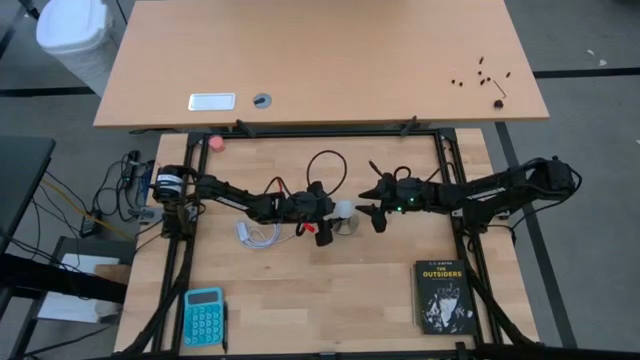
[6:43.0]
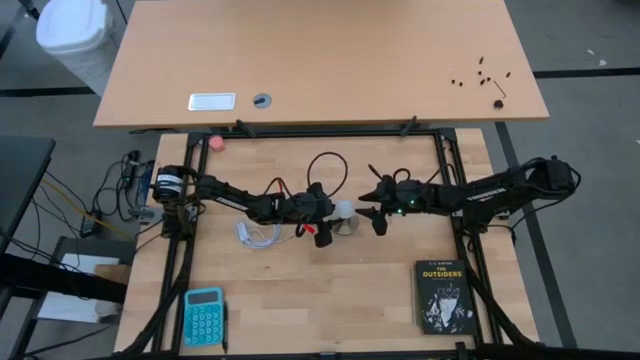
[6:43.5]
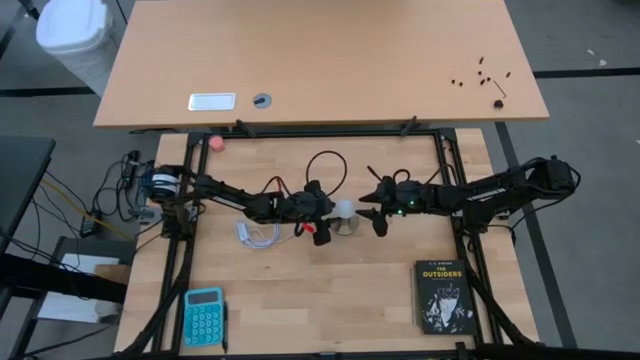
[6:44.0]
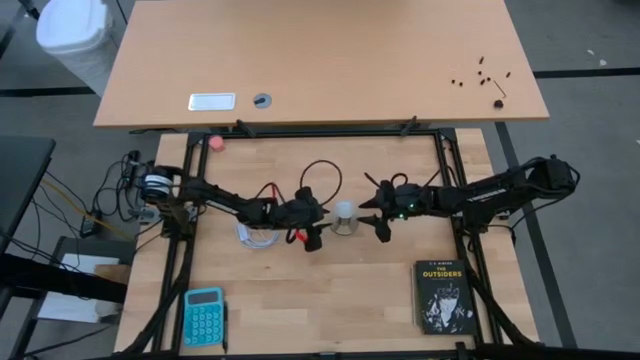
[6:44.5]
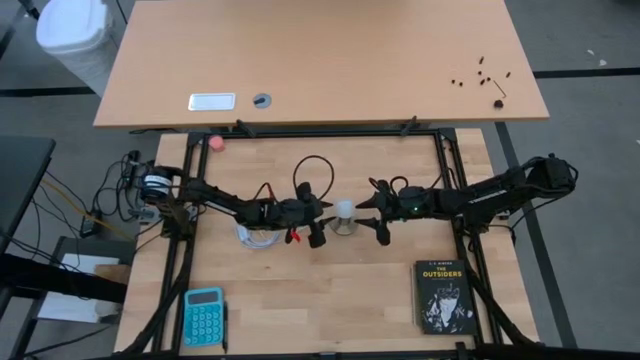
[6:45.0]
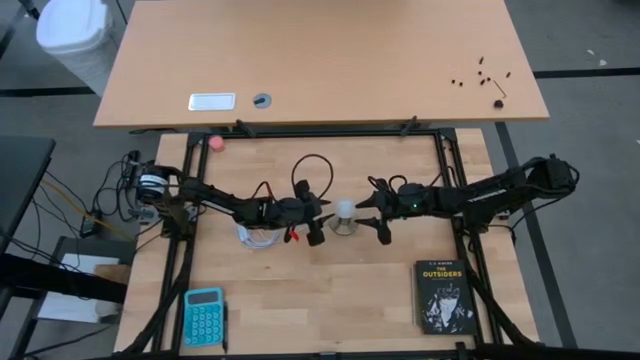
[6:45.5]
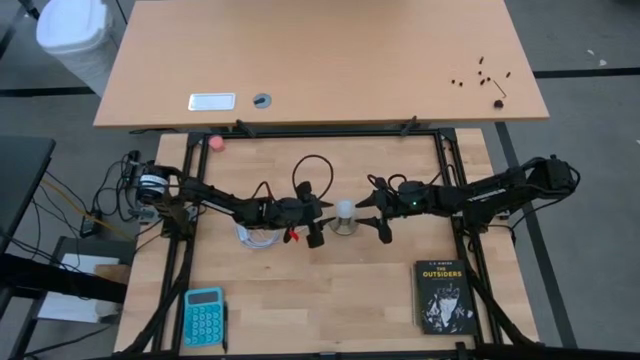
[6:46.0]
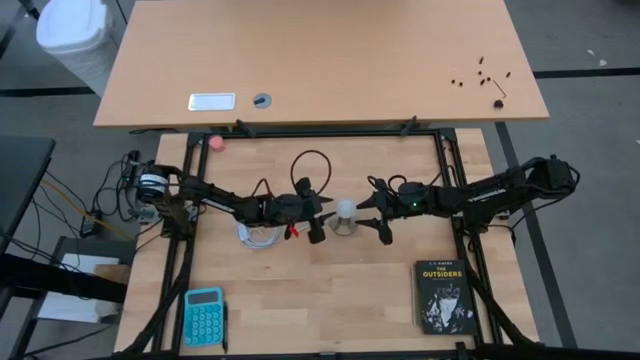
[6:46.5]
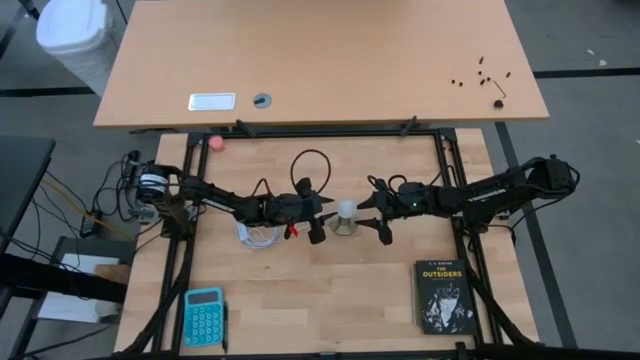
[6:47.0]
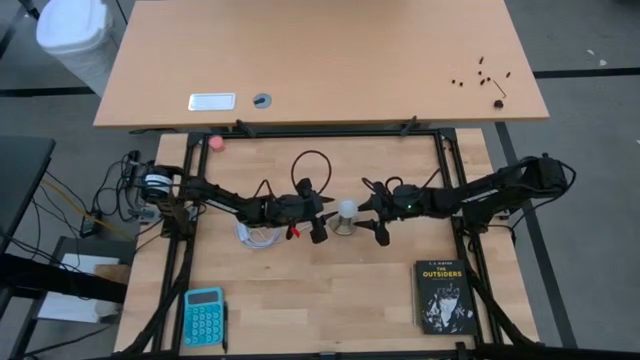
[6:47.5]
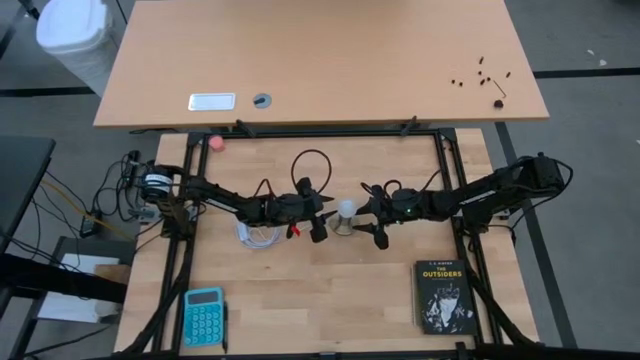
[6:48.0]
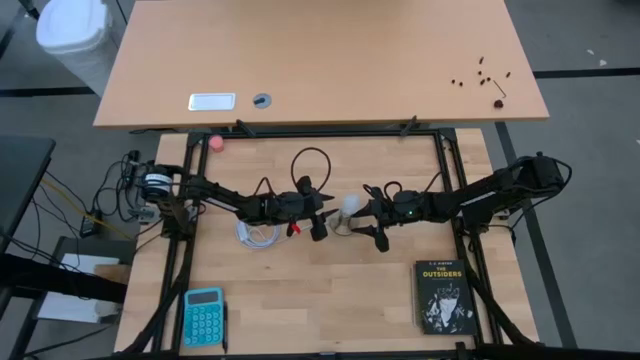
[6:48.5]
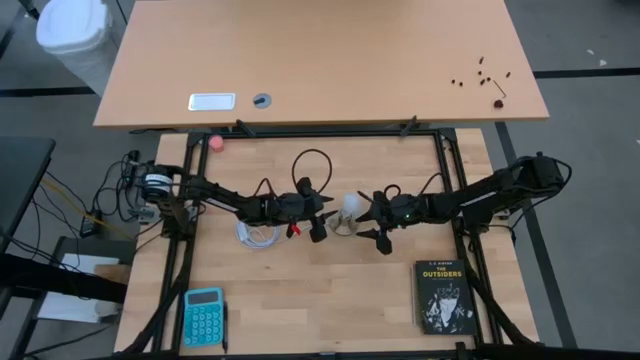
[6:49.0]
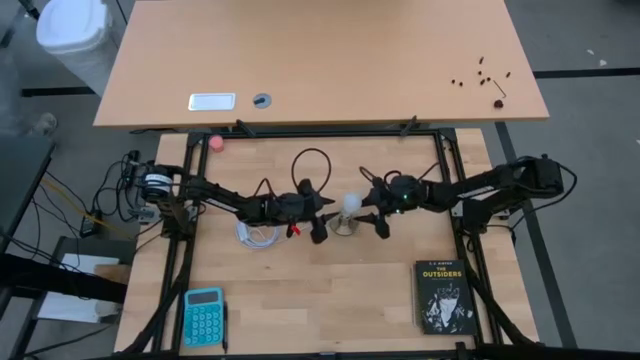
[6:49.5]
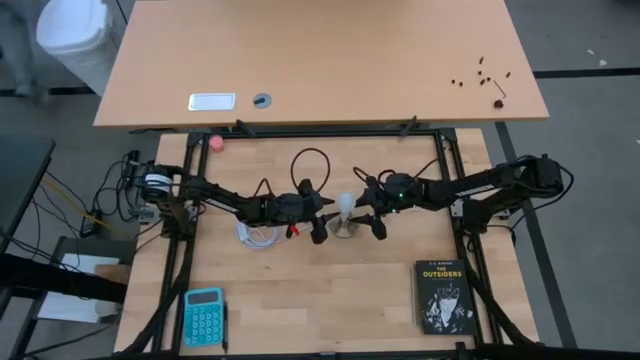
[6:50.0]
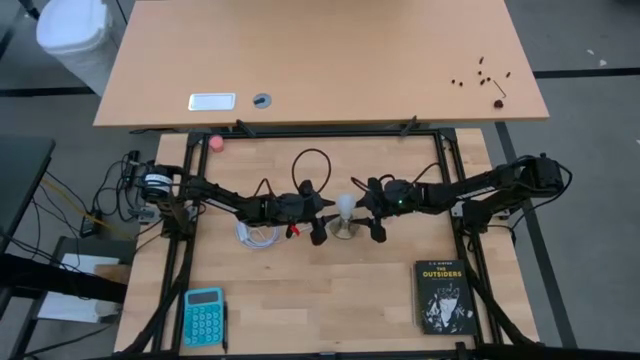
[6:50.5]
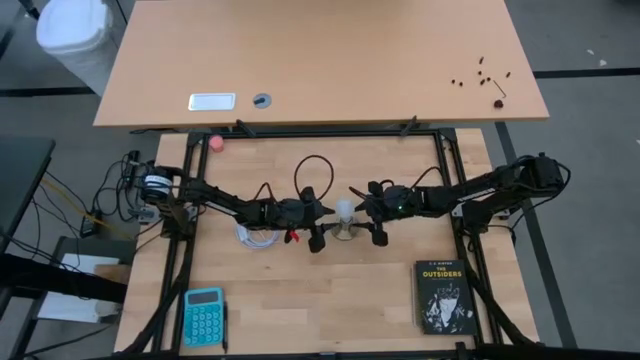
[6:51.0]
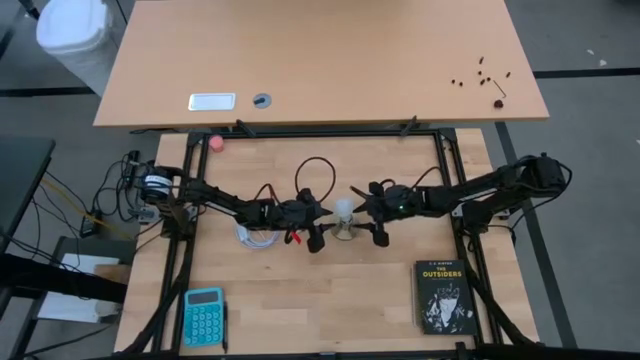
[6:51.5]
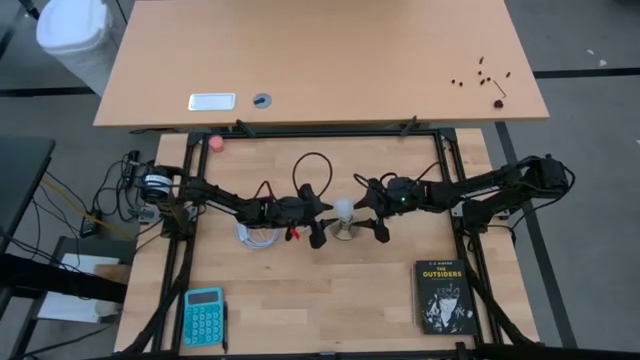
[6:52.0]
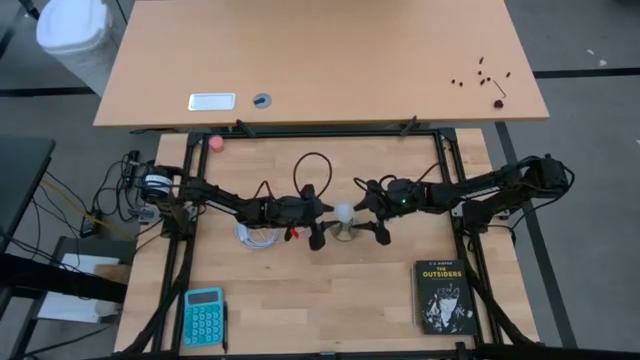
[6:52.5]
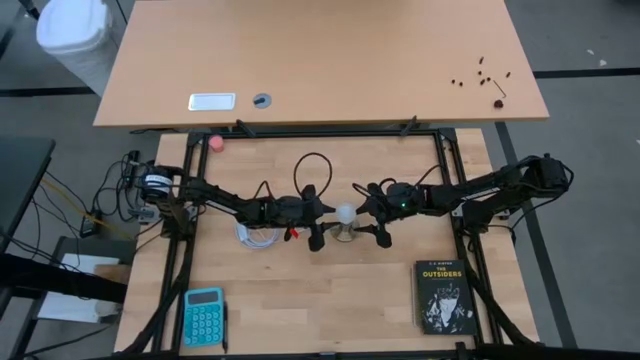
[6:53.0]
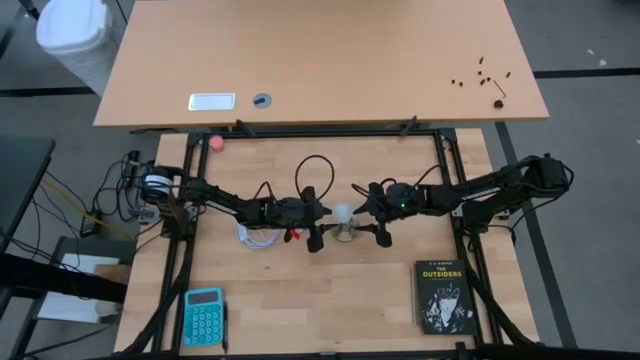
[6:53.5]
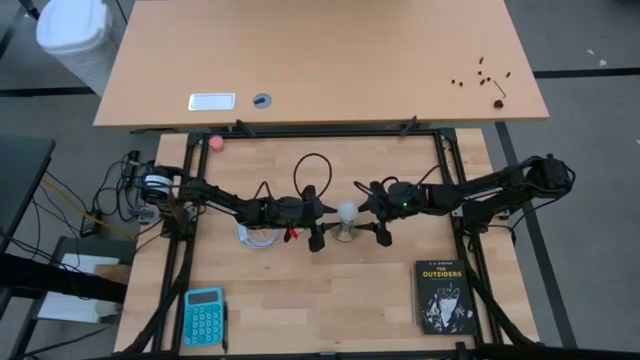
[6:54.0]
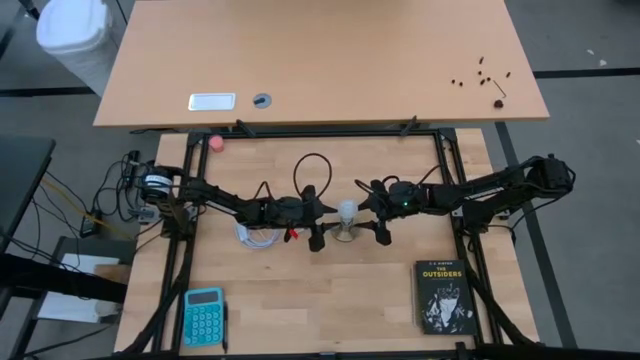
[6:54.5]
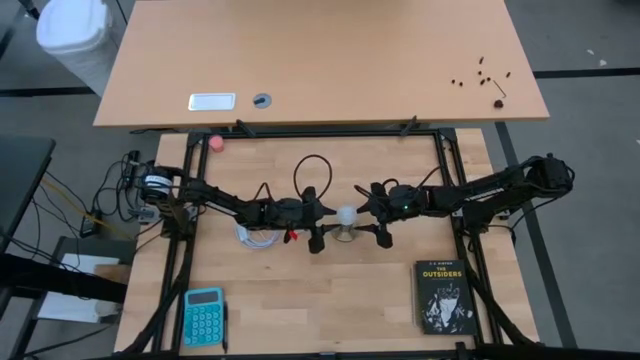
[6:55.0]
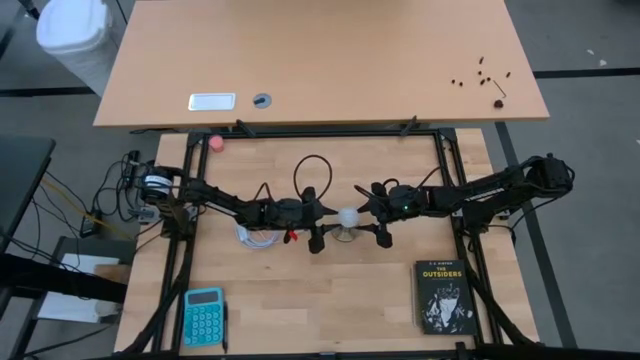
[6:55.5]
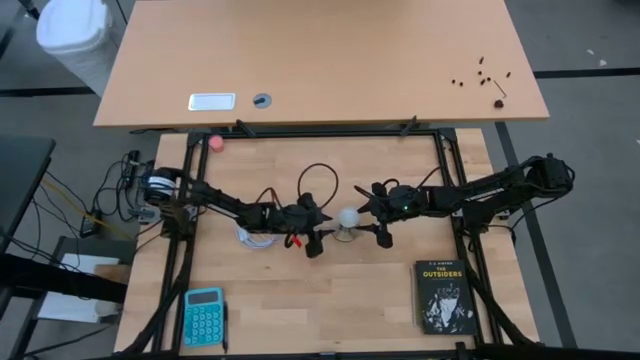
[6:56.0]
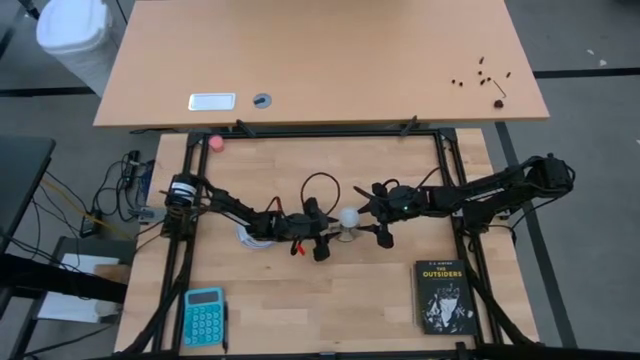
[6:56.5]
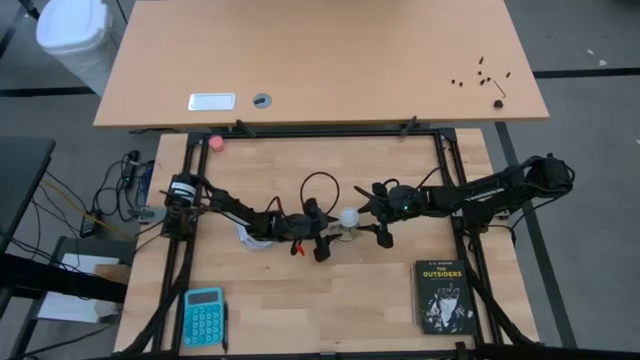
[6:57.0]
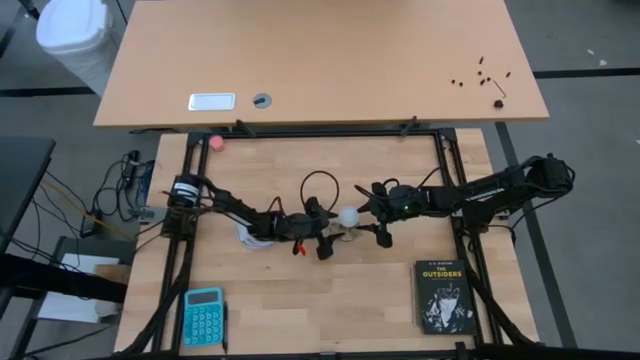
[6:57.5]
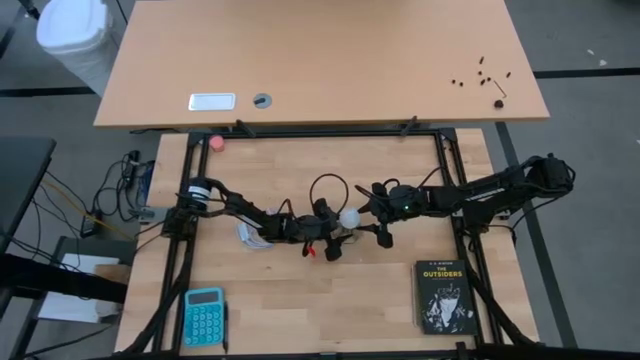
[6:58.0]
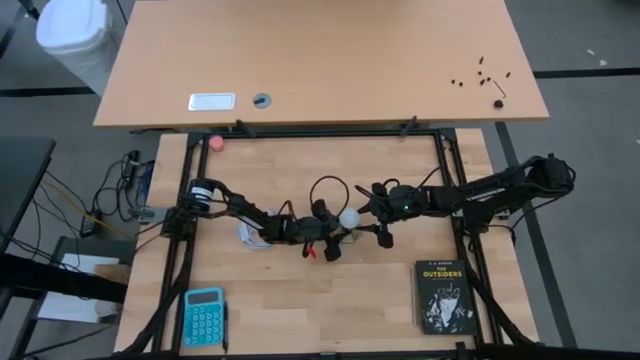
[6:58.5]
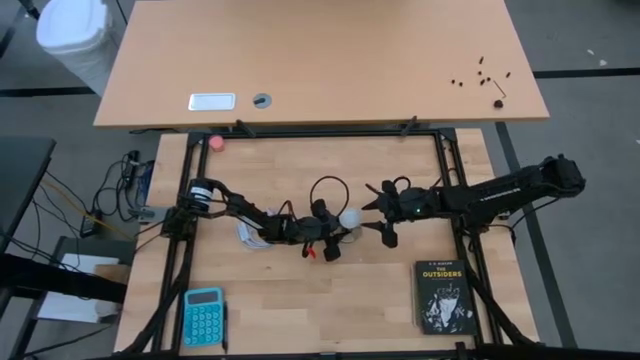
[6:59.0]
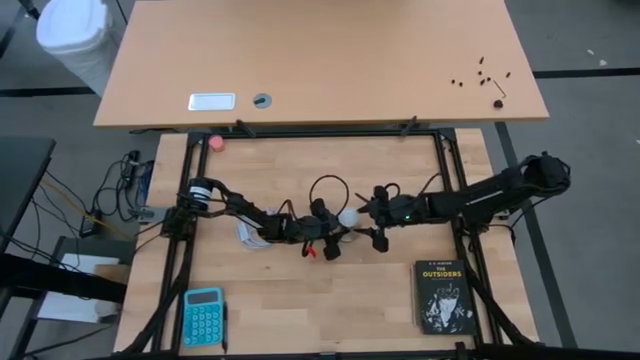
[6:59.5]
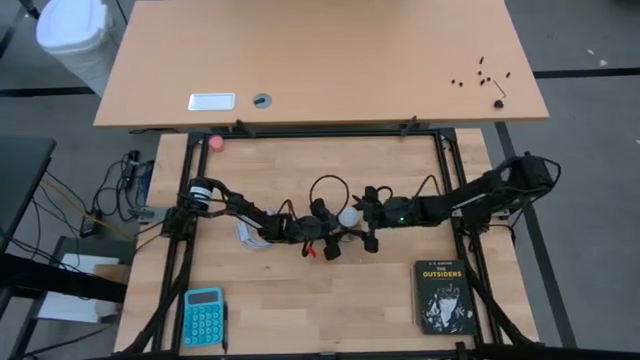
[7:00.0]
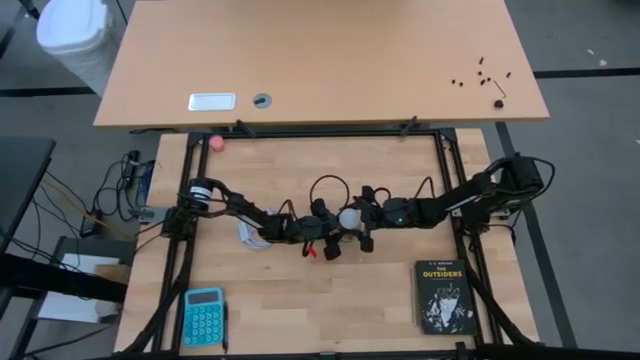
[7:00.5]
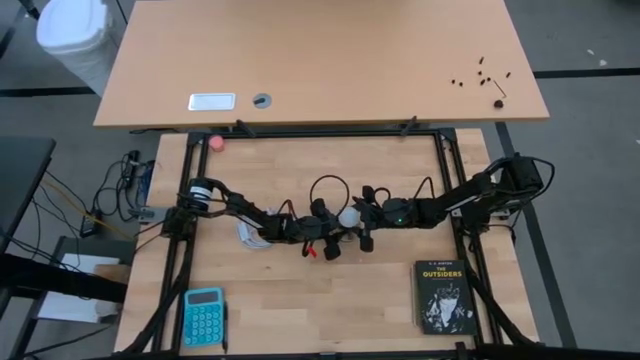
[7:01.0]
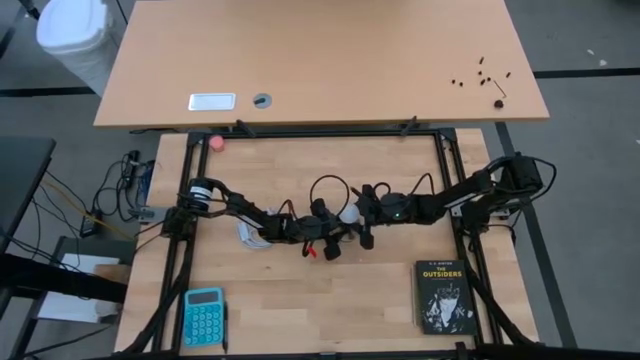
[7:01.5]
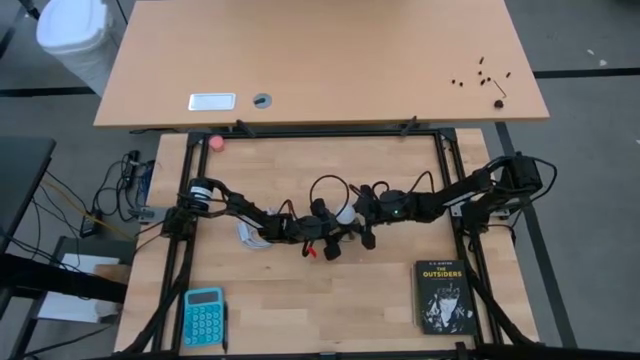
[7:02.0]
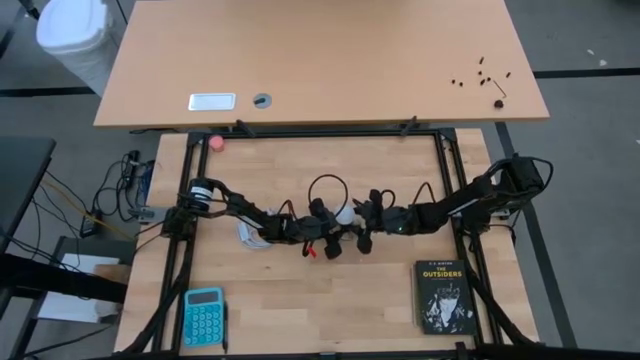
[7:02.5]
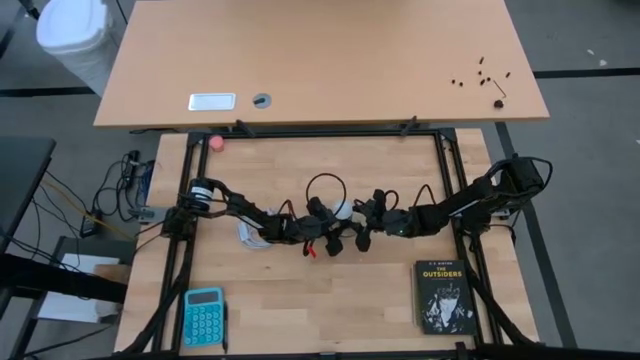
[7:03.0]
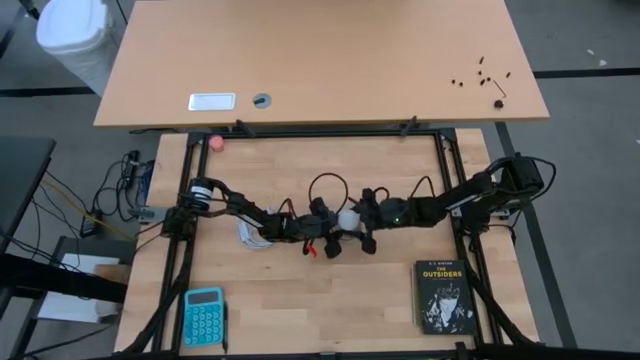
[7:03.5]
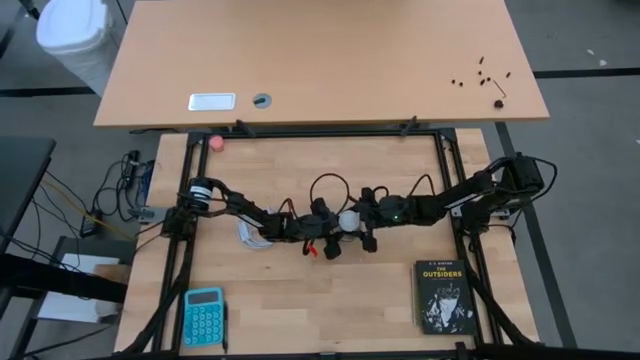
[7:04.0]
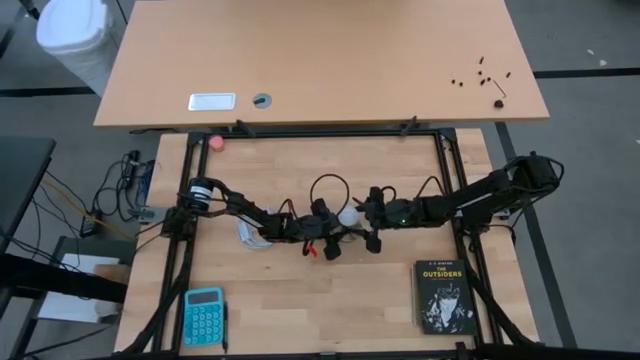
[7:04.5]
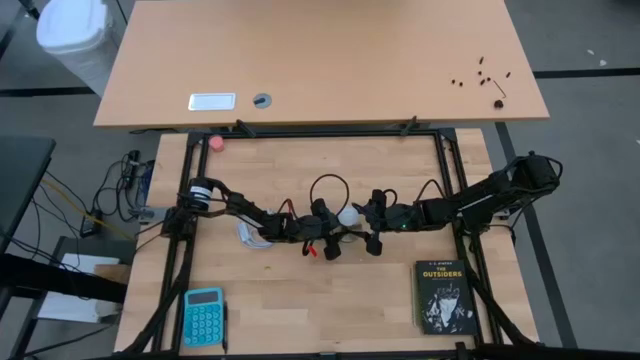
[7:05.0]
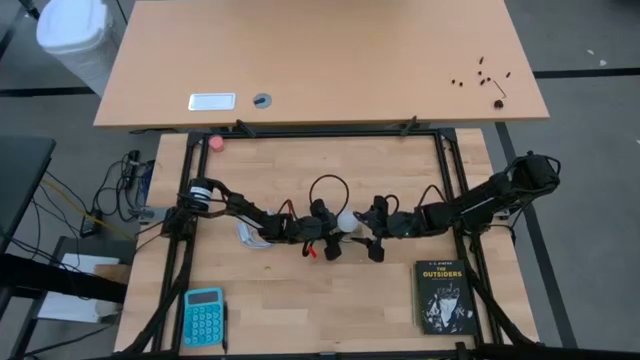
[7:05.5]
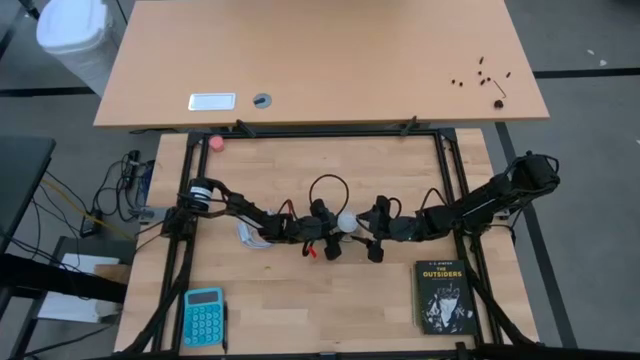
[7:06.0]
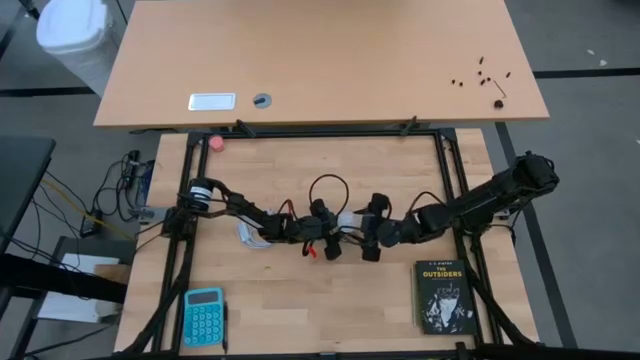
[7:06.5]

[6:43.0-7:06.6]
Task: Screw lightbulb
Insert the white lightbulb into the silver lamp
